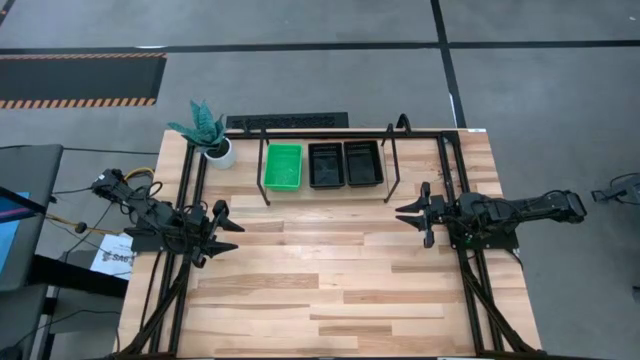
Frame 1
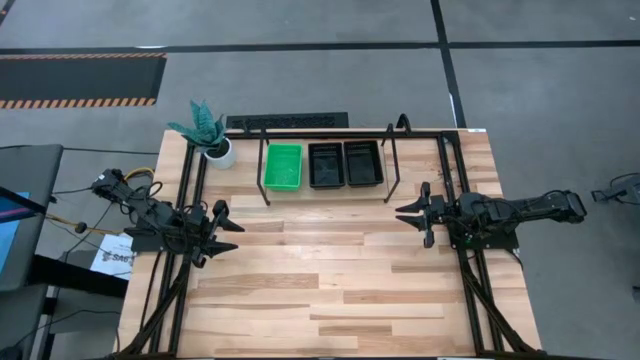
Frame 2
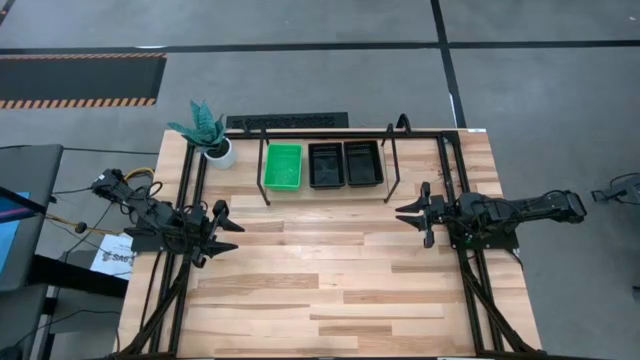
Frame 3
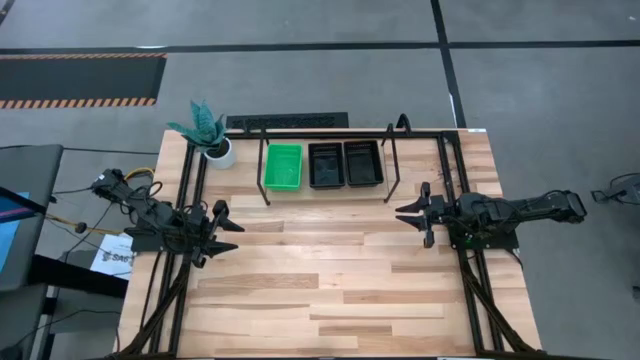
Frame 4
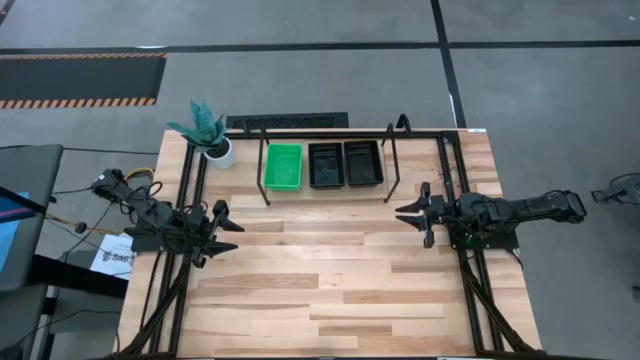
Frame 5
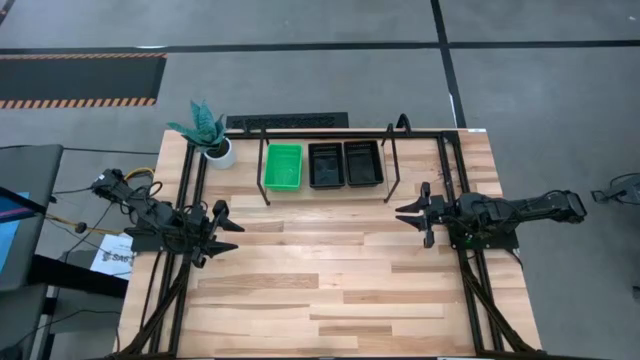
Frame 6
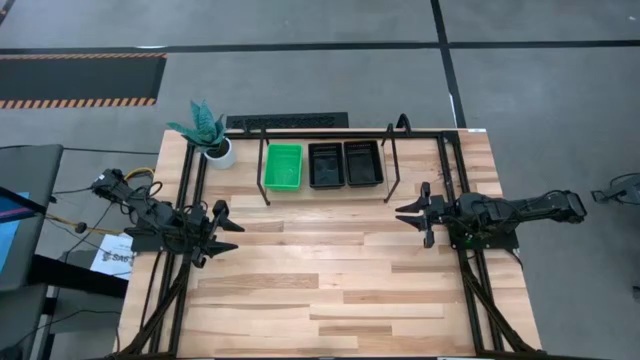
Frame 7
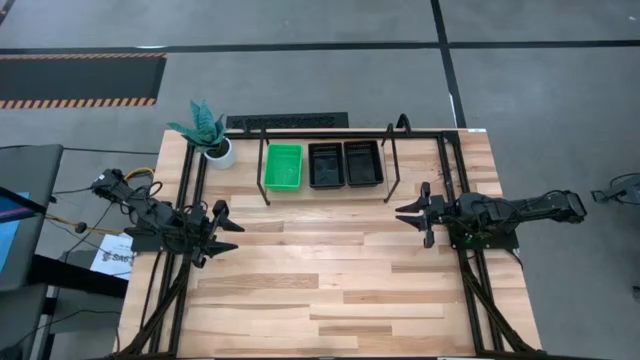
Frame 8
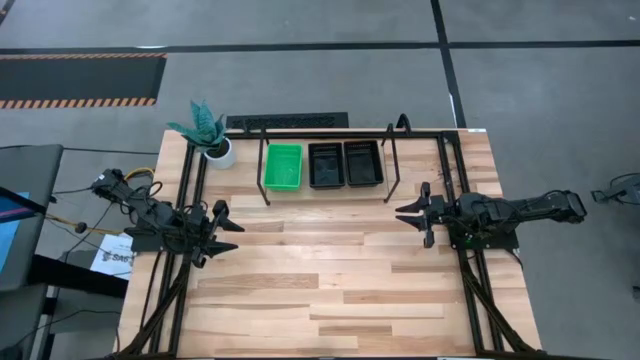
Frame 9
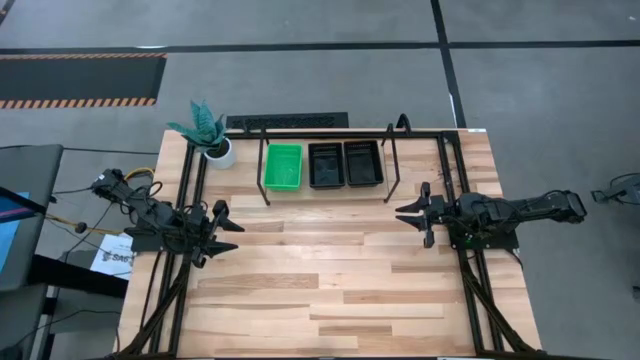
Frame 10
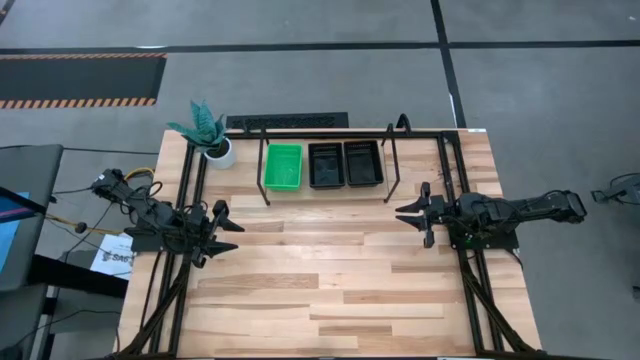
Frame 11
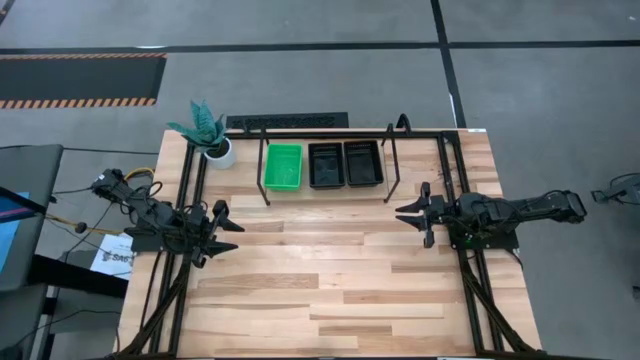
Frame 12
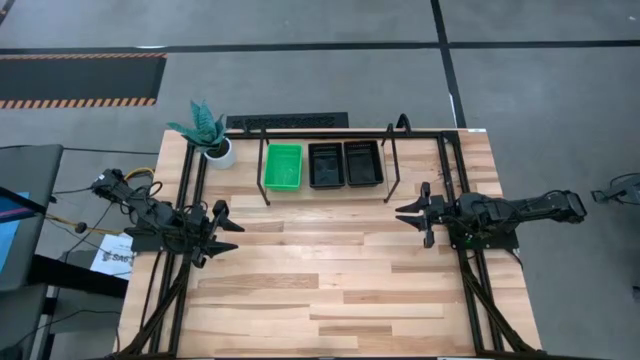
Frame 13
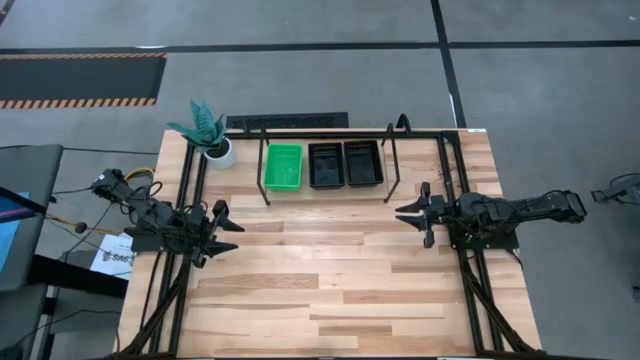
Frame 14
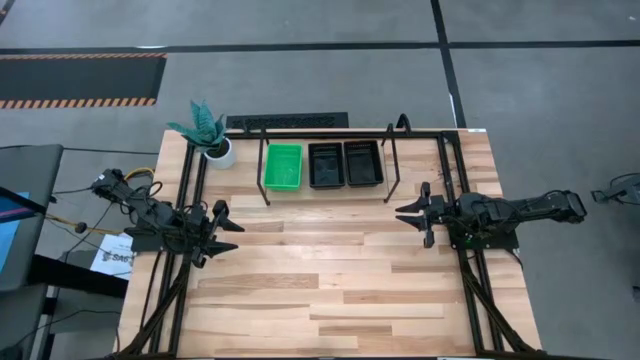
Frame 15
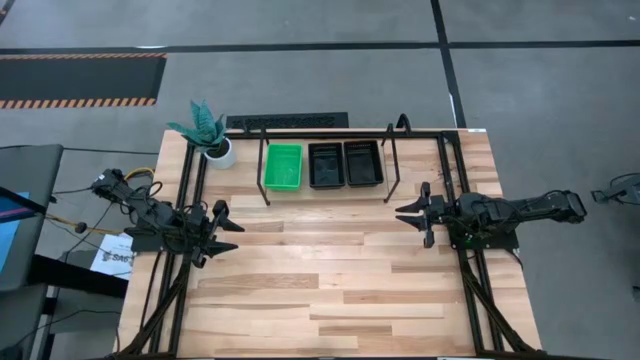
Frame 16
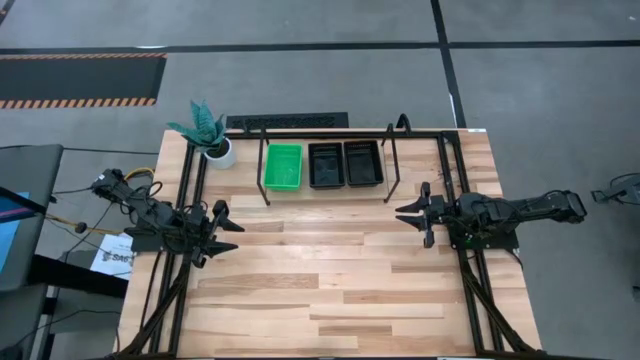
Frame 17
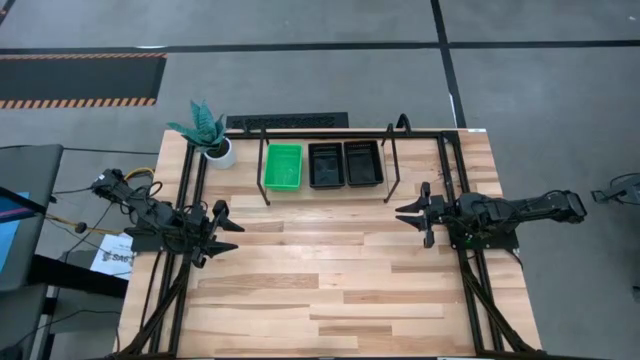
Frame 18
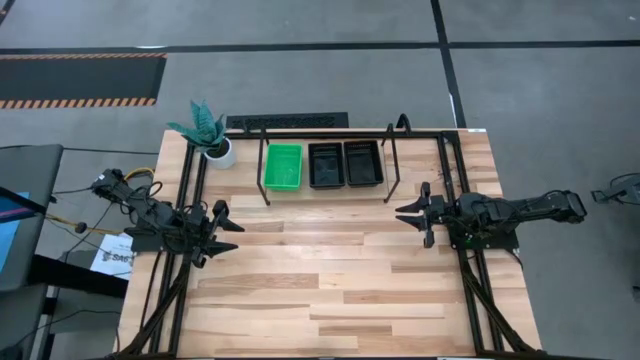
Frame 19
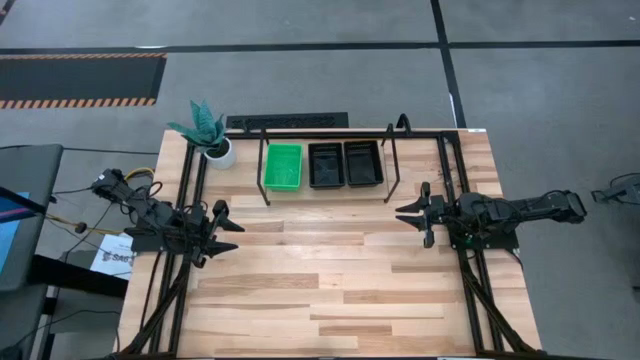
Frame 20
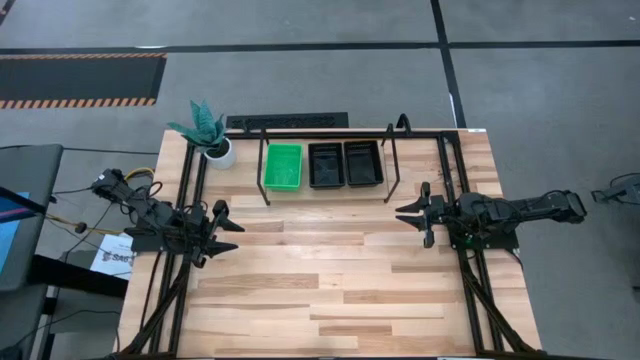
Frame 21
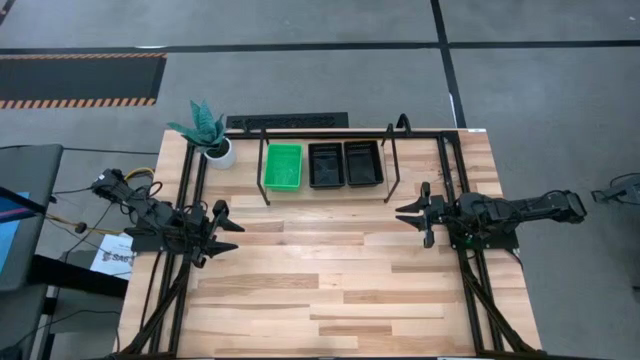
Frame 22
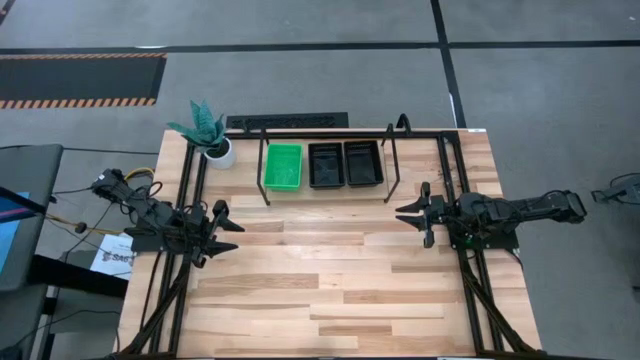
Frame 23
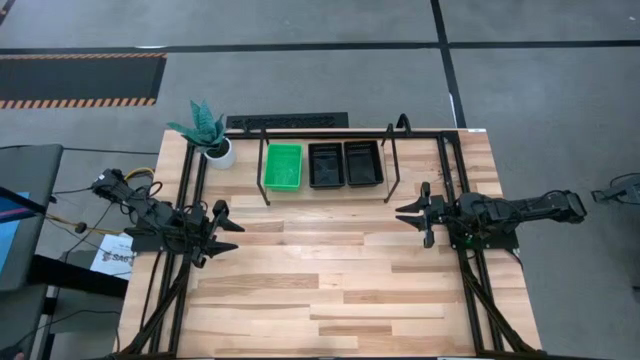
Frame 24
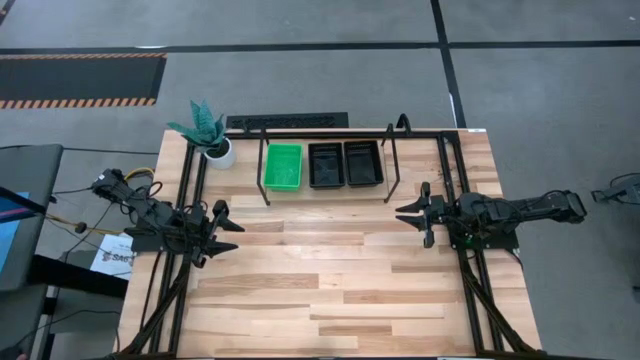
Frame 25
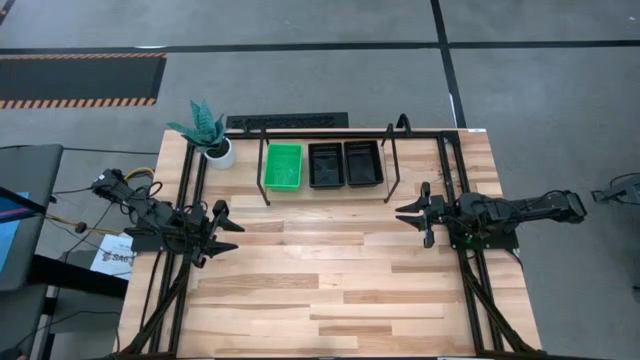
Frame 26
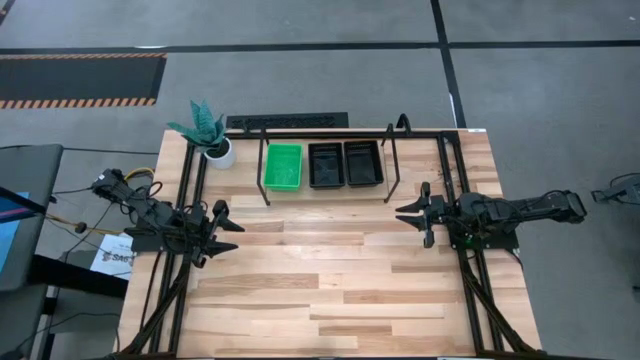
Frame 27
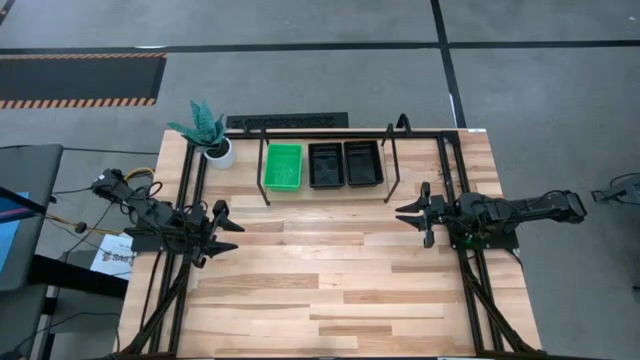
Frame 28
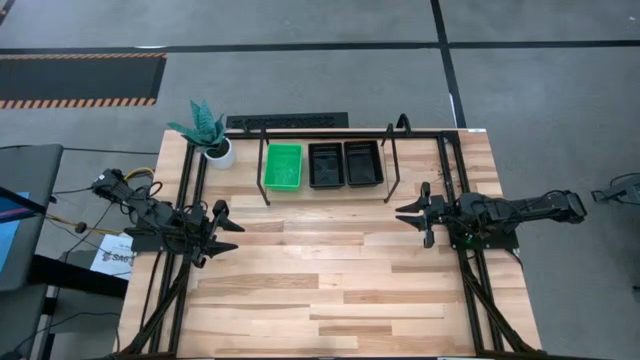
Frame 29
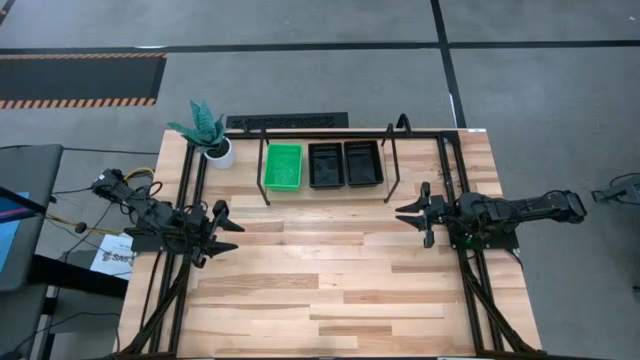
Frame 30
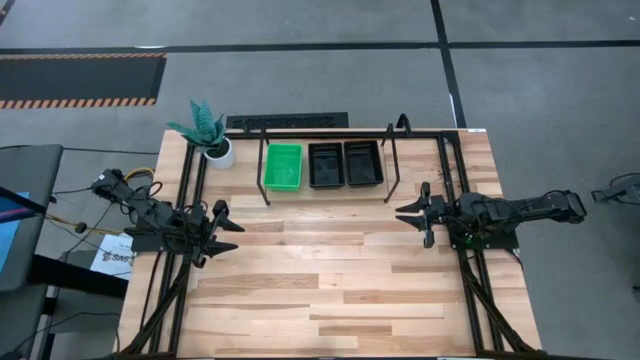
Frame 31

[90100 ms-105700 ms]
Task: Stack baskets on shelf by color
Return to Home Position

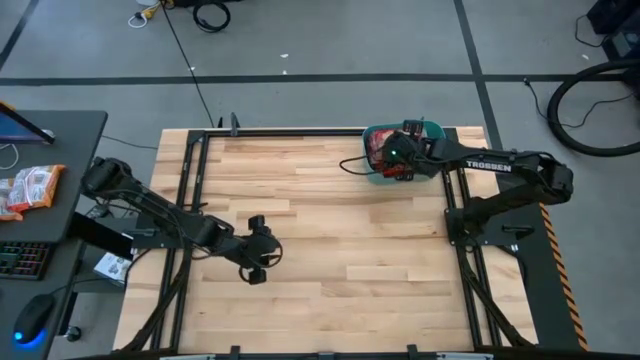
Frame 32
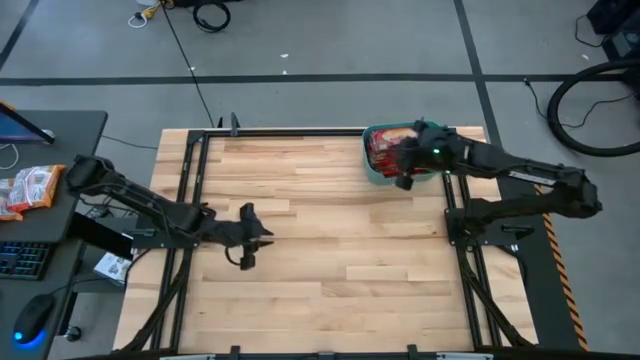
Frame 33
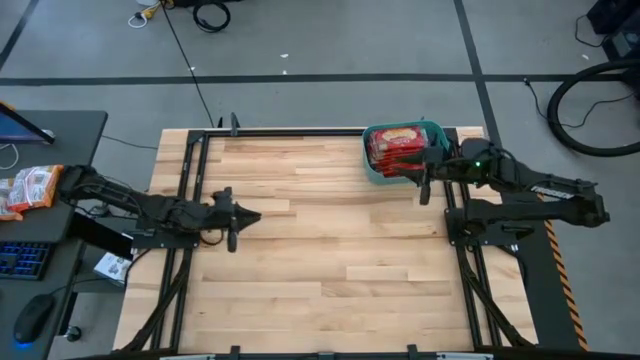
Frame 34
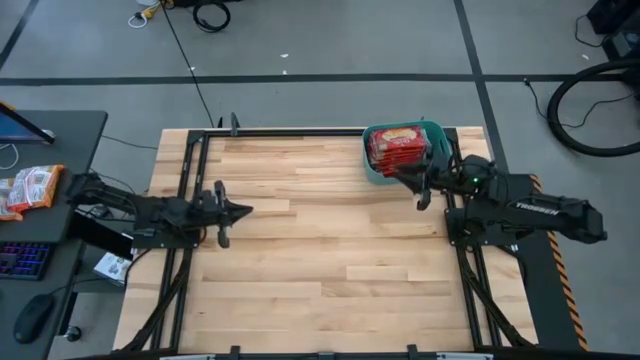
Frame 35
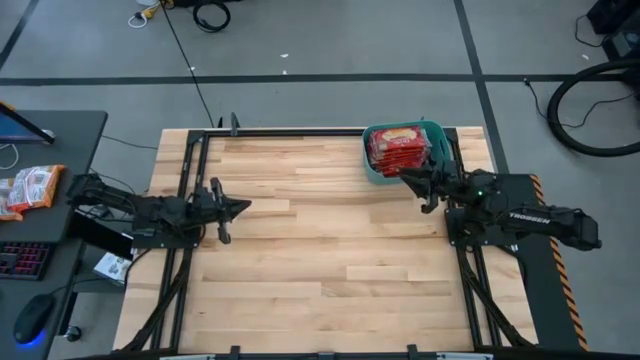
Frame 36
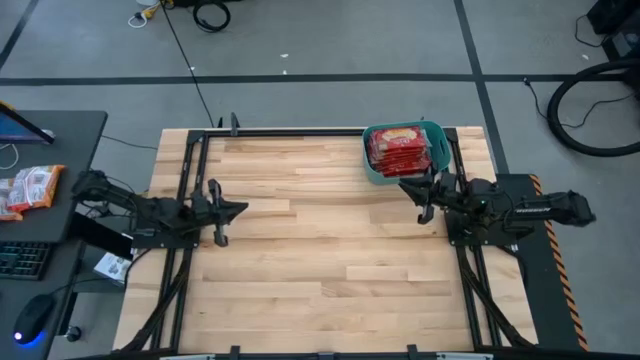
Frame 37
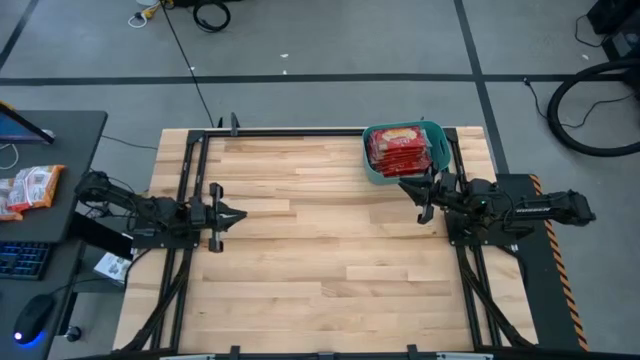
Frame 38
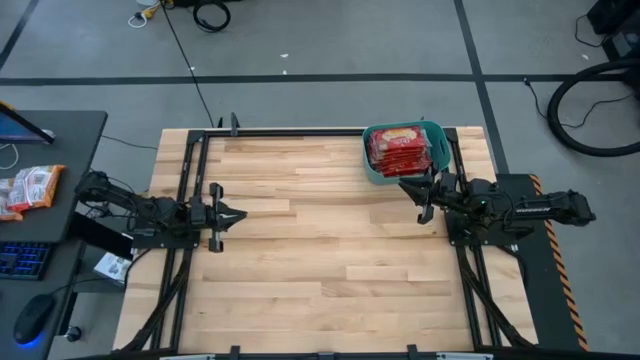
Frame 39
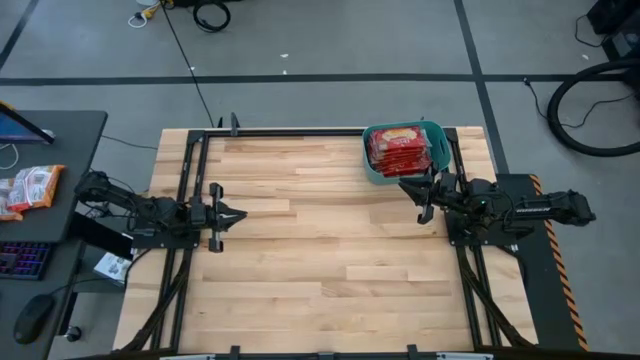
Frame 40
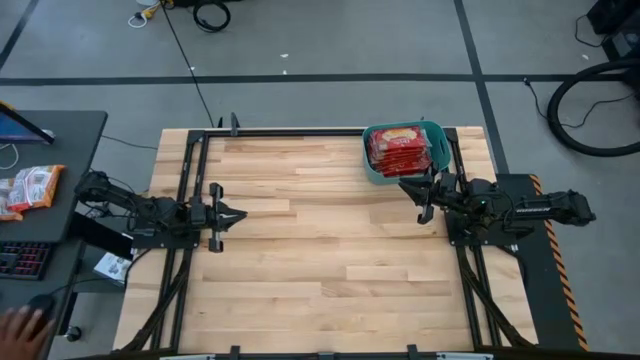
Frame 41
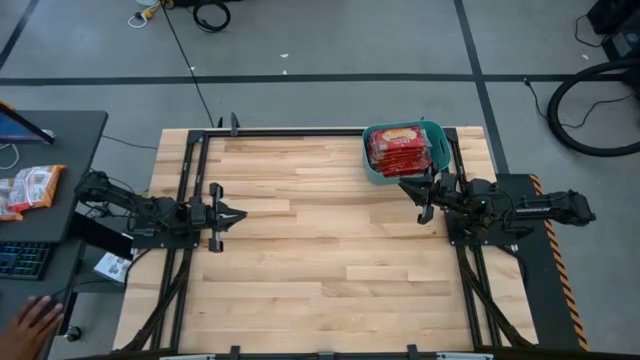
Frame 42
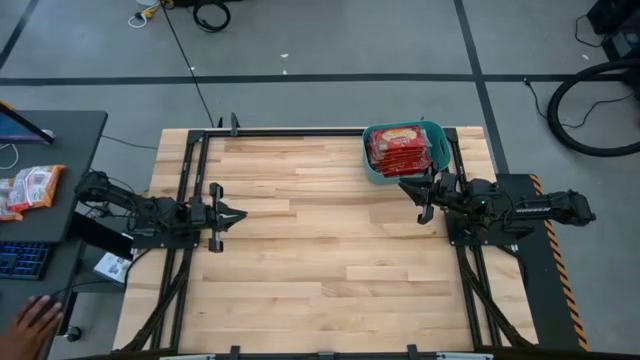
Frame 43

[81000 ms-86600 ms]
Task: Sort popcorn bags into baskets
Return to Home Position
